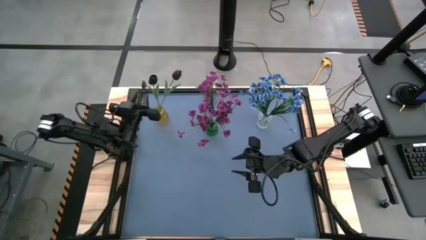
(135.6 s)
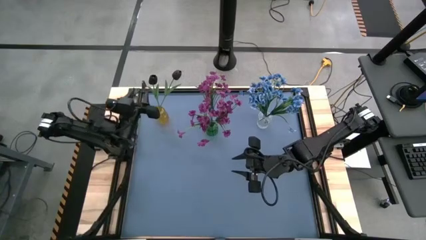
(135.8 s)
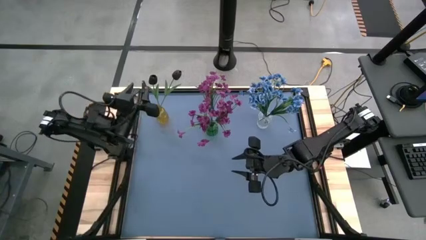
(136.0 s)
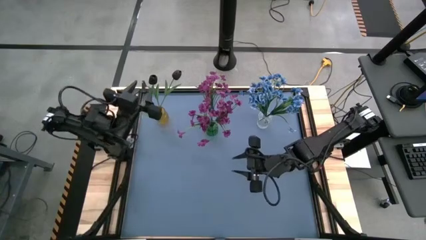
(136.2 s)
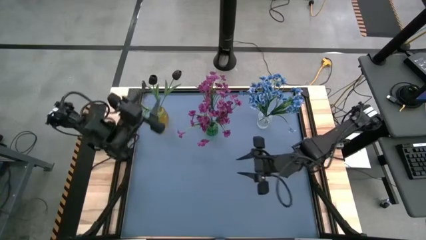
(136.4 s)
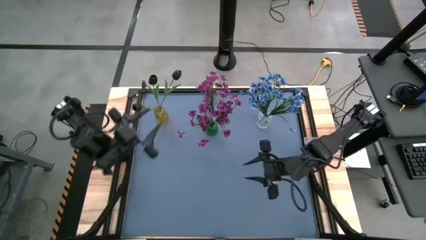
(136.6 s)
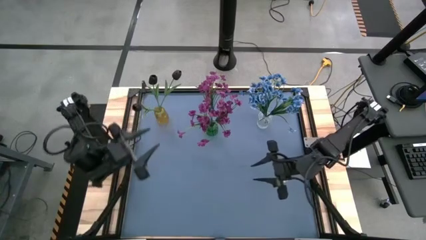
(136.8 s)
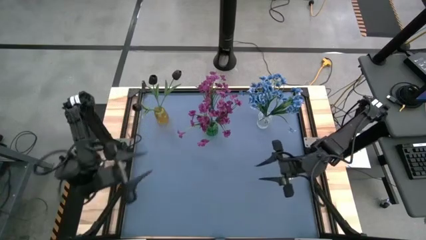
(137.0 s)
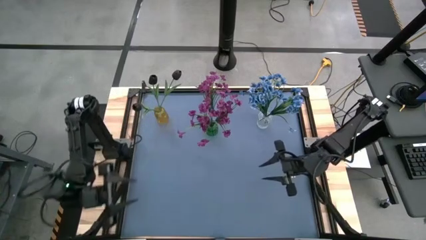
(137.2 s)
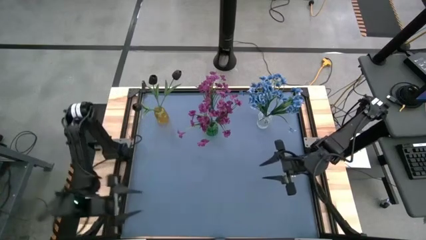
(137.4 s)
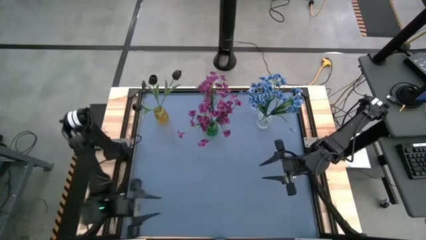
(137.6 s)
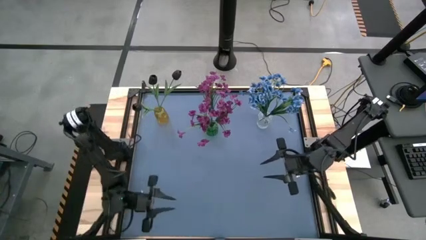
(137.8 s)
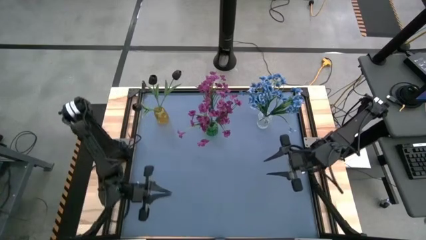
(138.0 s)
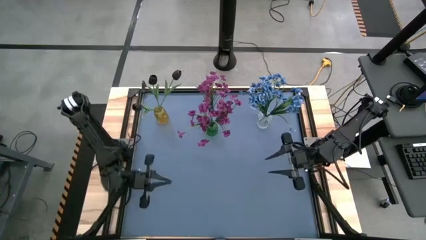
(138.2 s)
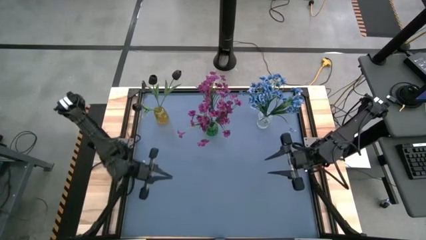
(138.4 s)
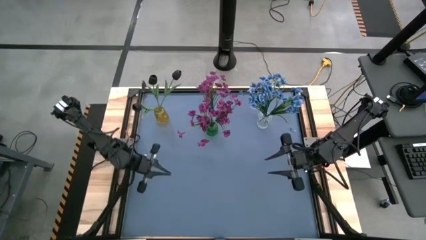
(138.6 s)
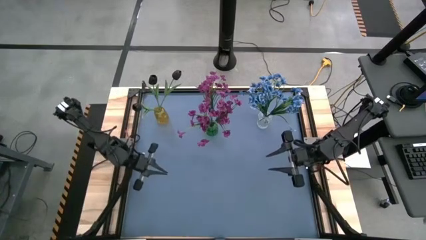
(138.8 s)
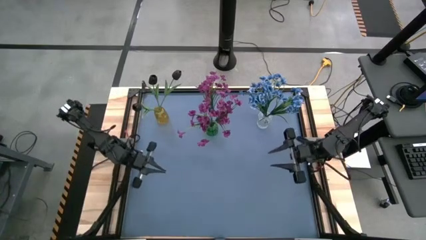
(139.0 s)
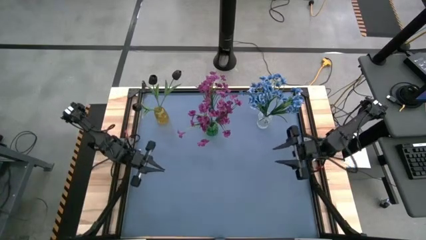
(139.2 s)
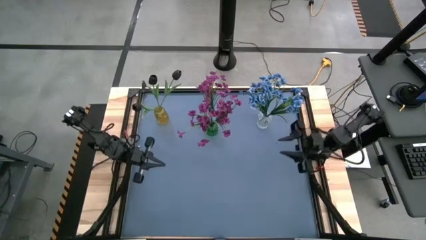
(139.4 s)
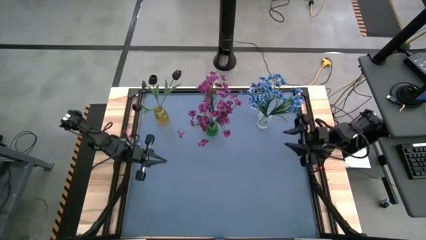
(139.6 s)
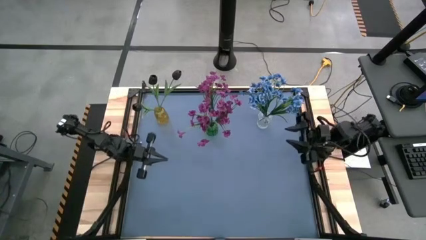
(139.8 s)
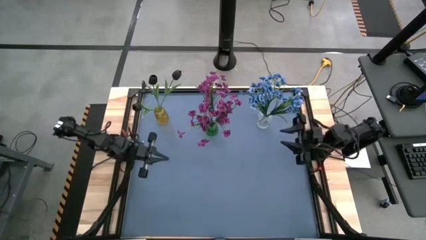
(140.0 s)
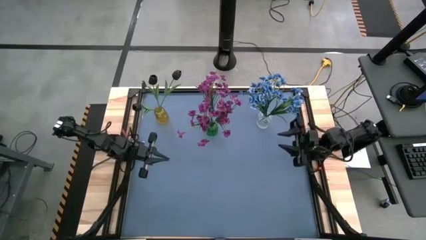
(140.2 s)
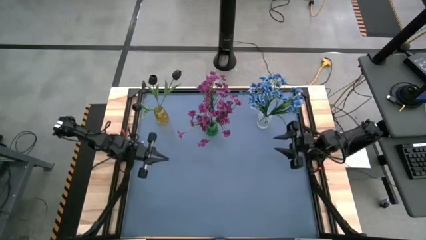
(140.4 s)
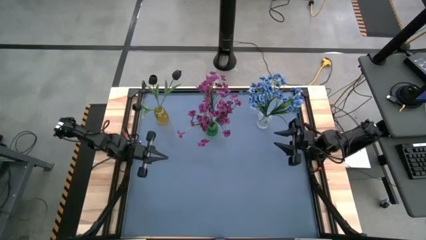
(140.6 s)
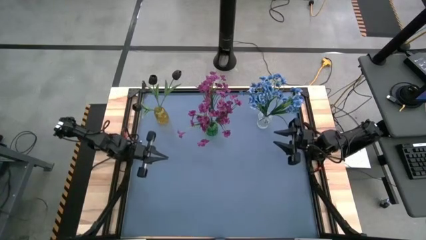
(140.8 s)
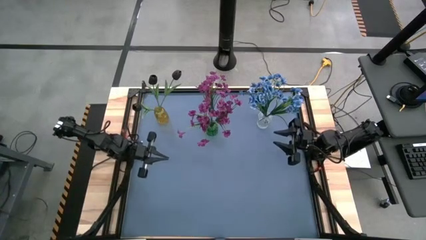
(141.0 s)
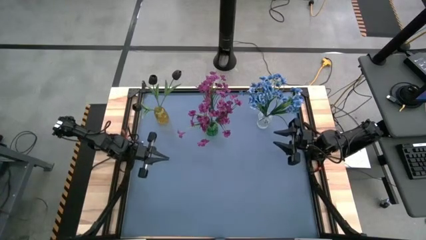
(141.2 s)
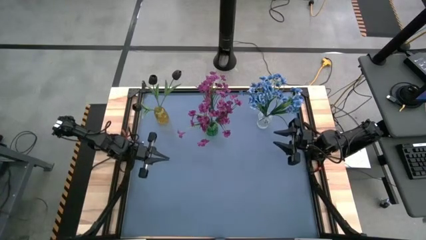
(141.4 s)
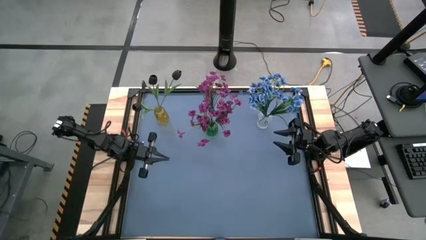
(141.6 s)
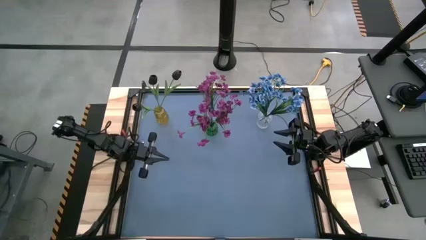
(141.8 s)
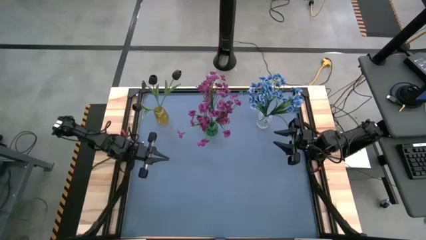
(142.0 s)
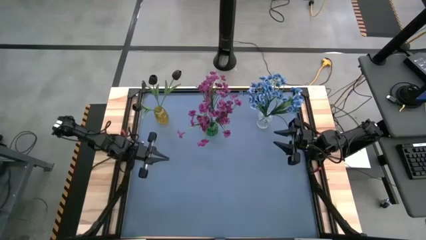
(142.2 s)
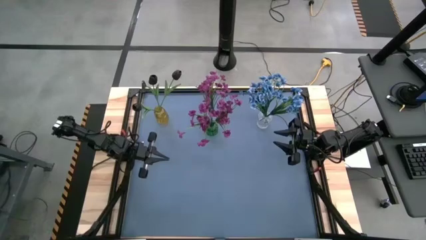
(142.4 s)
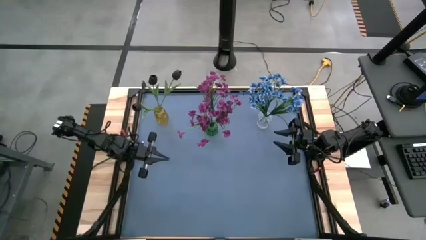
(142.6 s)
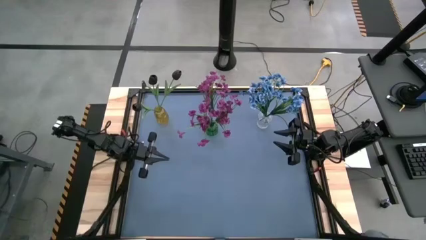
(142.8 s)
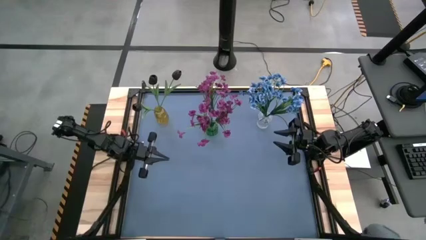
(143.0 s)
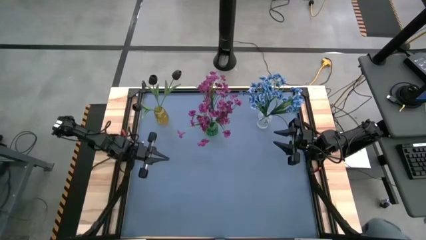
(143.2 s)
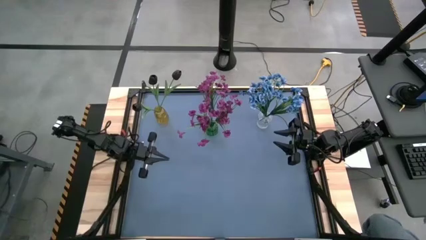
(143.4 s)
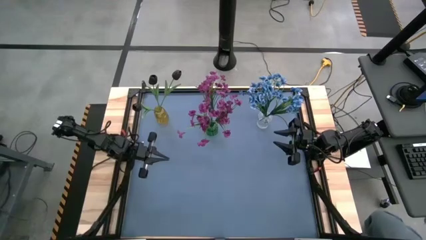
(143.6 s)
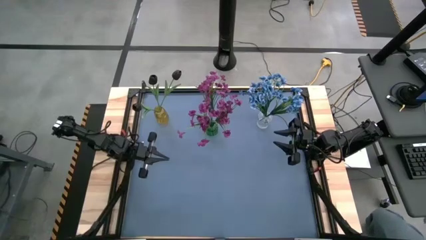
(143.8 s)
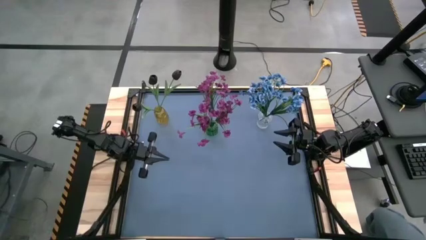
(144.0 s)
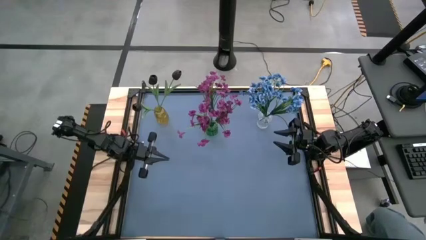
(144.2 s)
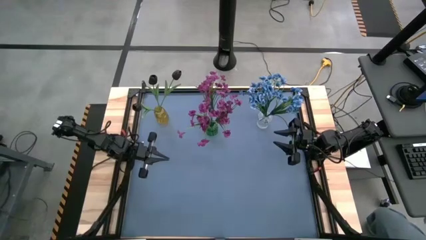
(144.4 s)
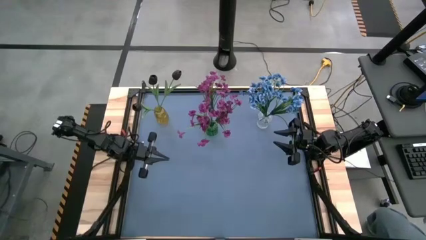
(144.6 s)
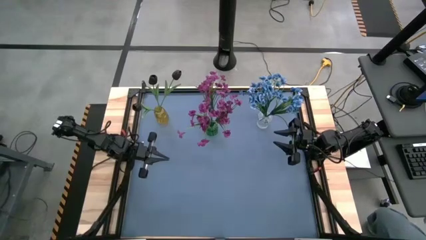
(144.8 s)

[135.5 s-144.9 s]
Task: Sort flowers into vase by color
Return to Home Position
